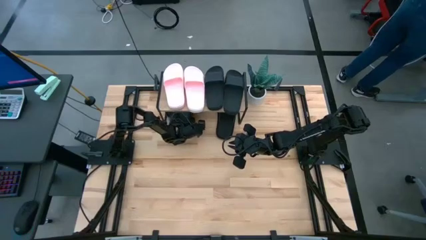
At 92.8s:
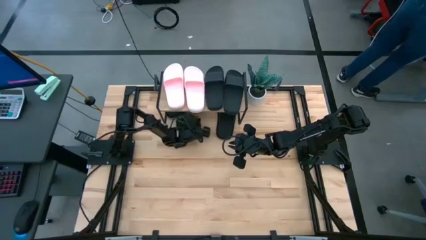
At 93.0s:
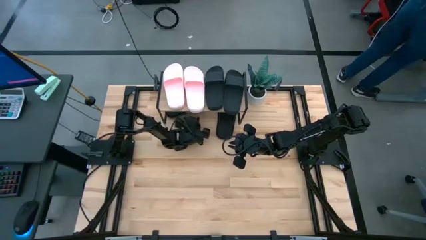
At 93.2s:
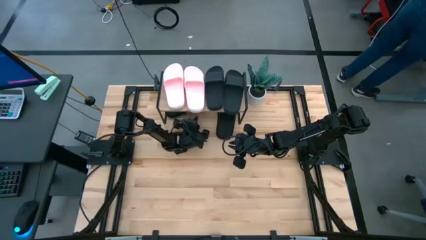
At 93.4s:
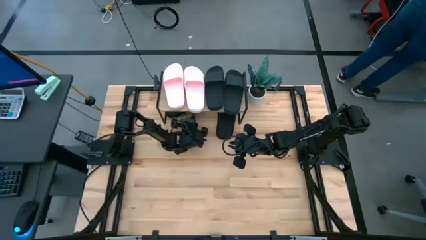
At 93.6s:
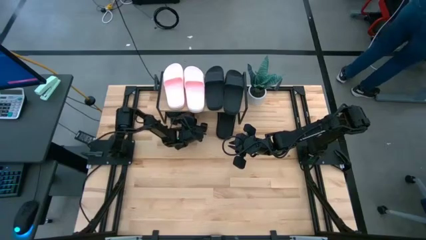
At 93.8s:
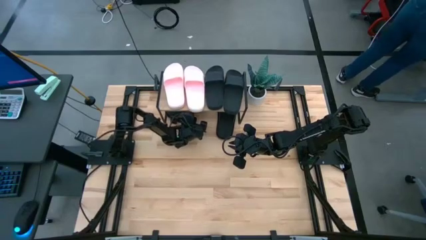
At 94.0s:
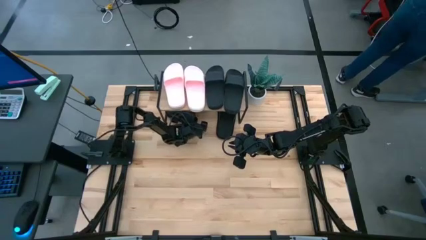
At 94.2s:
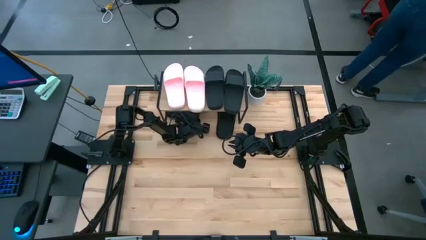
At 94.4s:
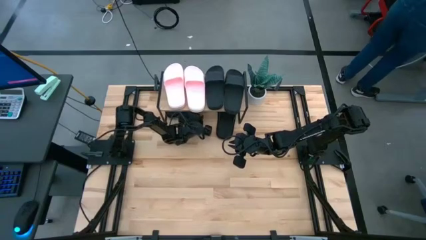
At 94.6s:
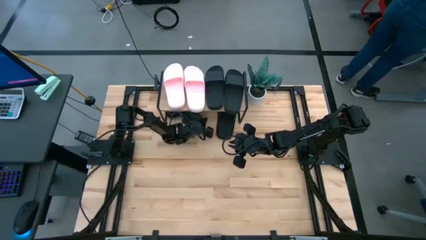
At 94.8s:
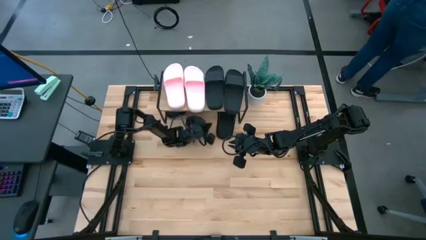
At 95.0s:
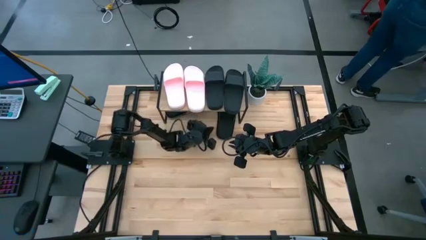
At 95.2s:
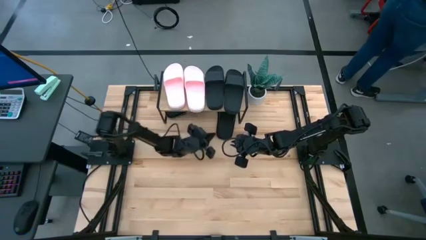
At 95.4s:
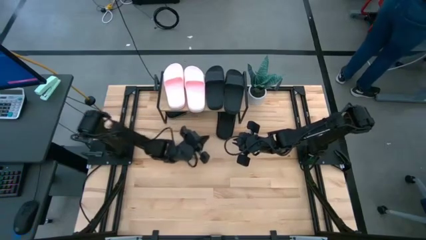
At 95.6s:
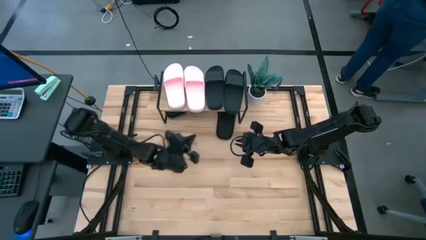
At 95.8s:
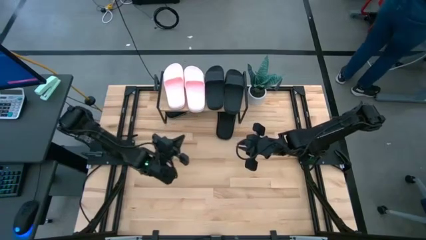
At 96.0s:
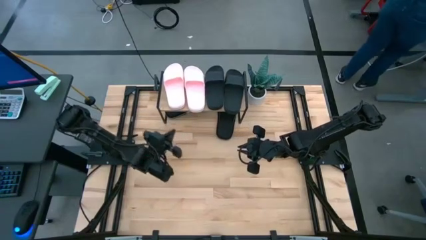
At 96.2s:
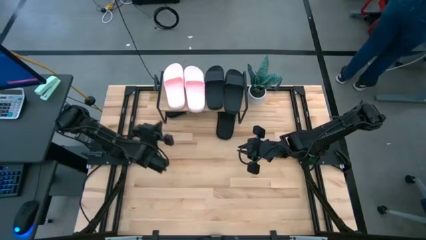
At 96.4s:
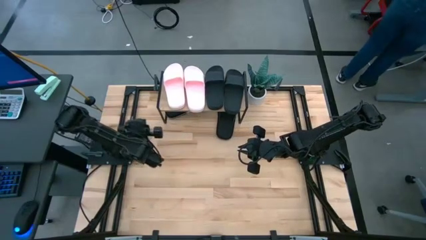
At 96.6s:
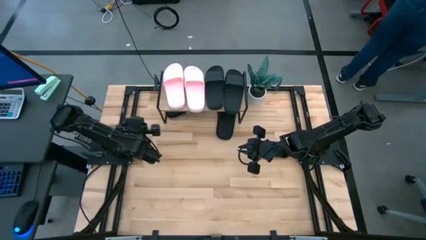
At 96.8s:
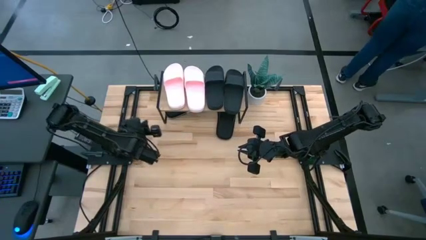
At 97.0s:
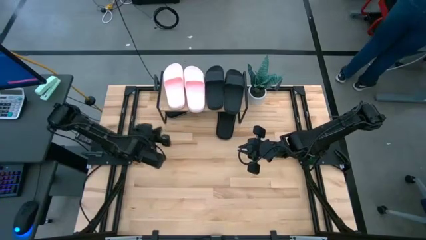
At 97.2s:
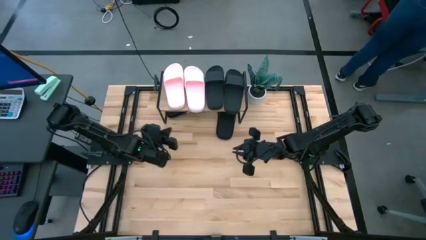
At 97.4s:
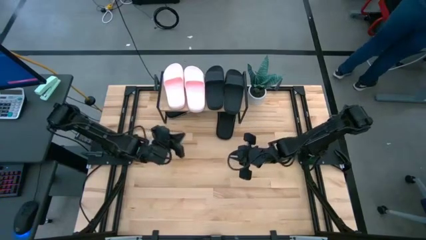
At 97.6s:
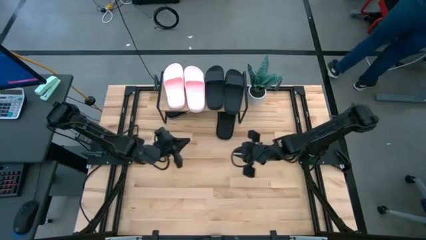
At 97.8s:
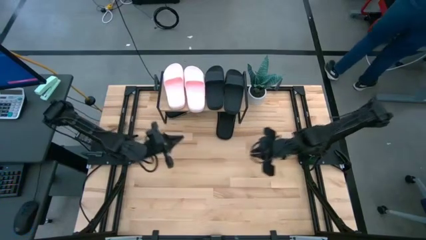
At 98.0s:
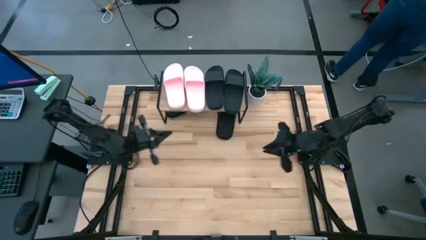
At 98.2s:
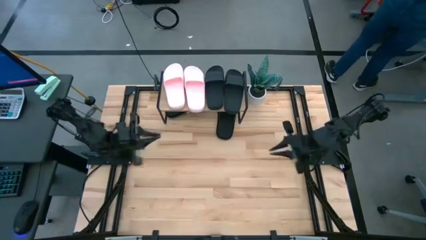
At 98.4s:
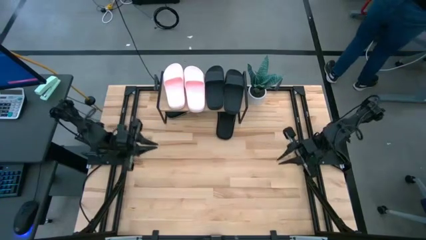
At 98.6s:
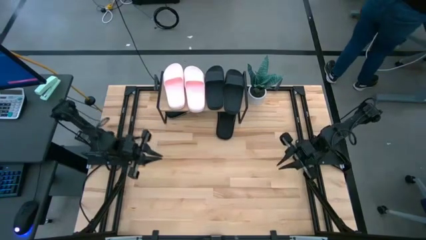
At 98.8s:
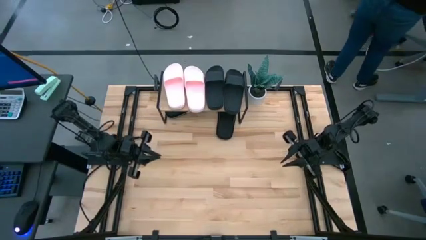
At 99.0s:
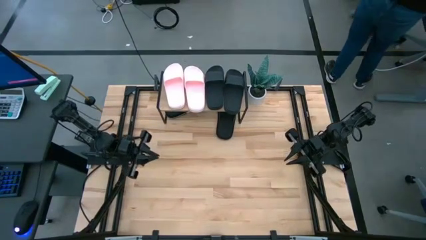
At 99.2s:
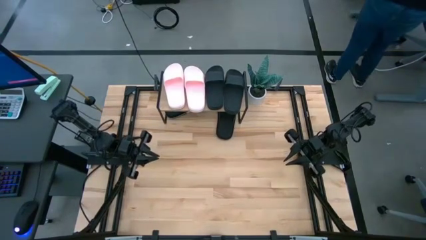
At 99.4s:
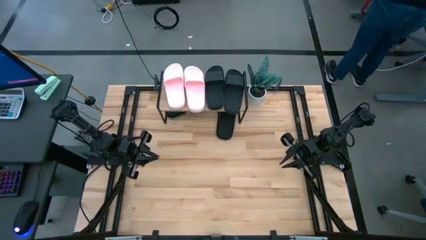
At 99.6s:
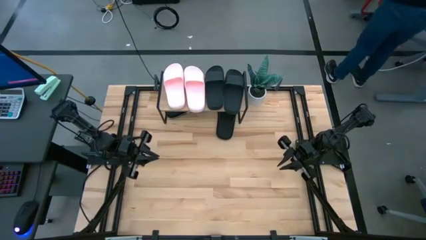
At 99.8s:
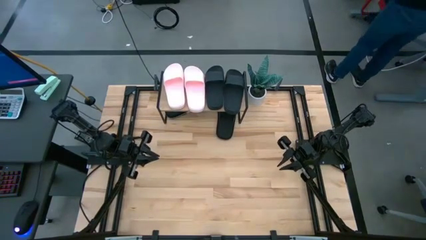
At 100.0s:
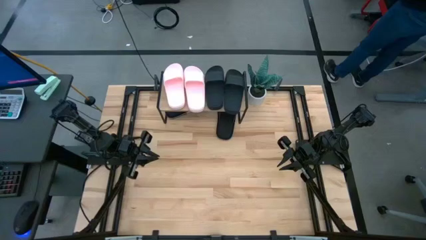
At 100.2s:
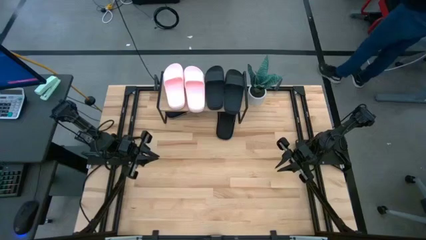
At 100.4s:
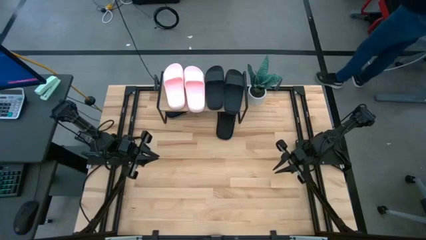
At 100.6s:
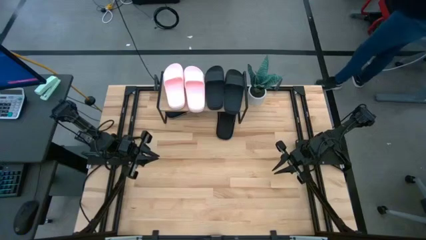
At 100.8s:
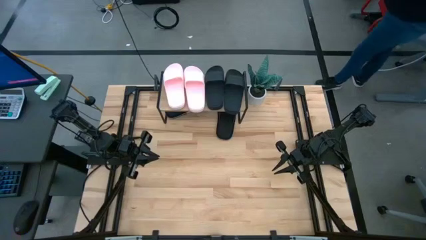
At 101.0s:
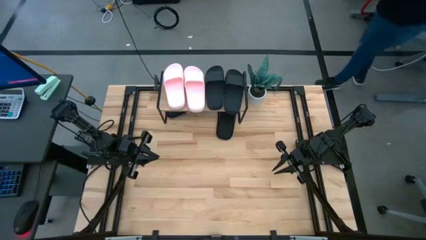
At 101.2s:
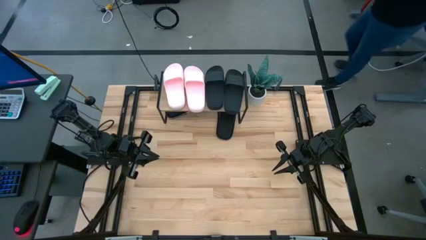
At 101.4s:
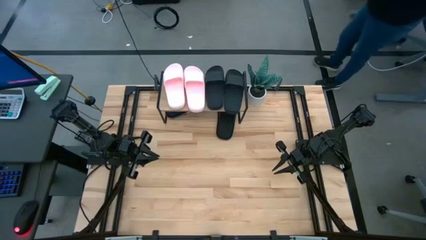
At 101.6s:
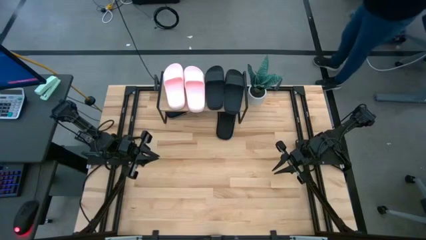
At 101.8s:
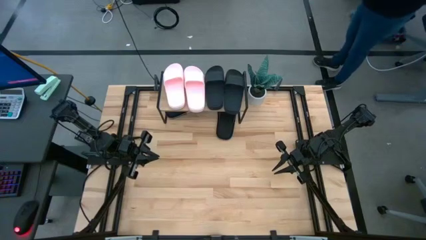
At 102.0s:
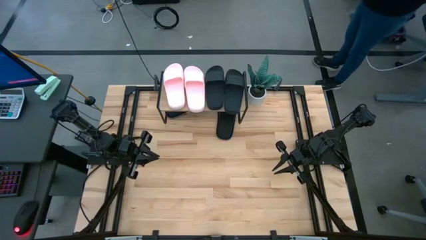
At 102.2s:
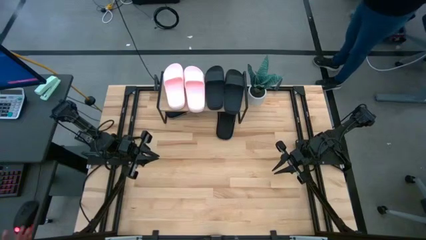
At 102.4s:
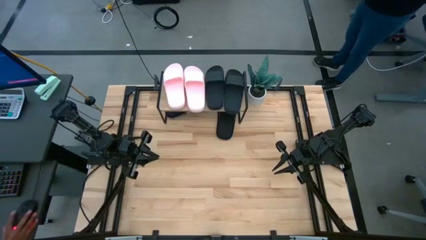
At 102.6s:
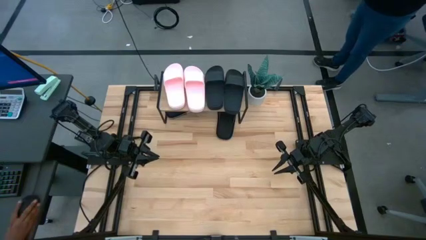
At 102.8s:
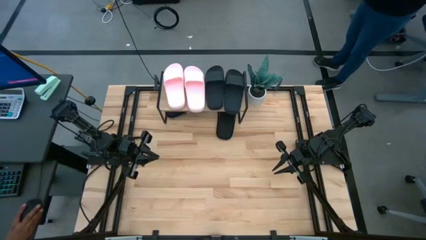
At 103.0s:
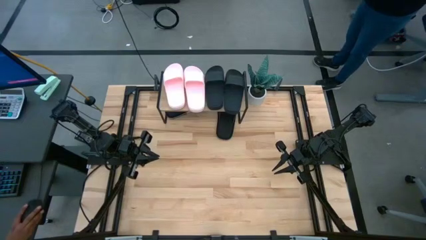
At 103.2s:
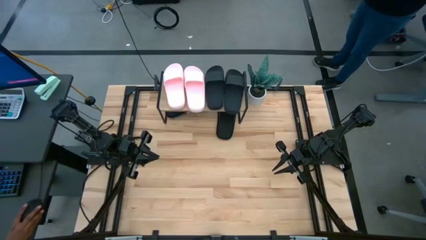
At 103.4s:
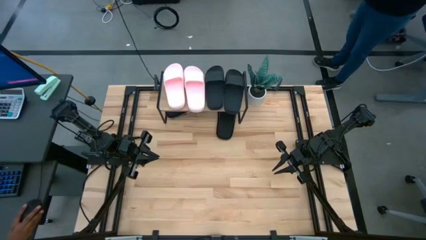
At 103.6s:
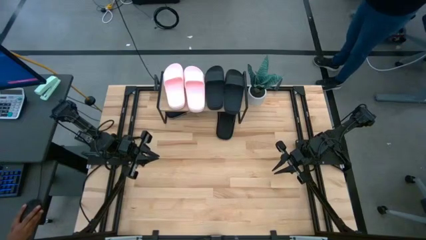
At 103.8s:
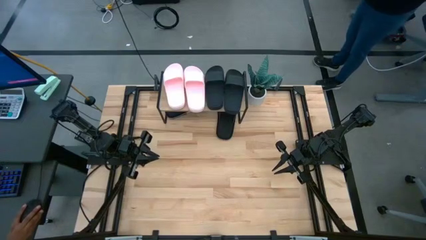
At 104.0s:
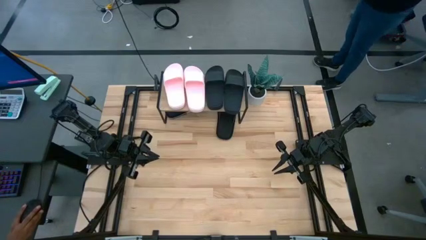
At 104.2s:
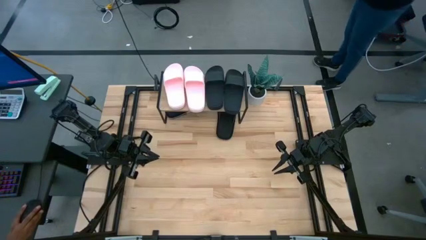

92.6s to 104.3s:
Task: Pick and place slides into the shelf
Return to Home Position

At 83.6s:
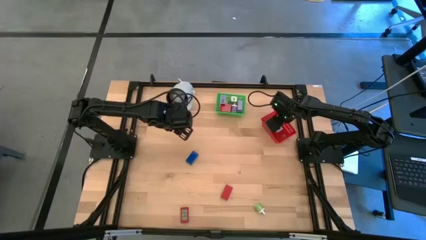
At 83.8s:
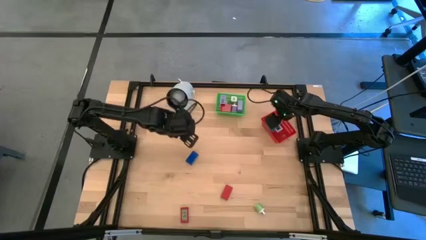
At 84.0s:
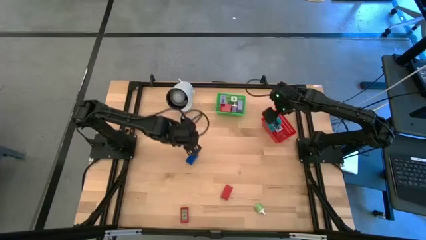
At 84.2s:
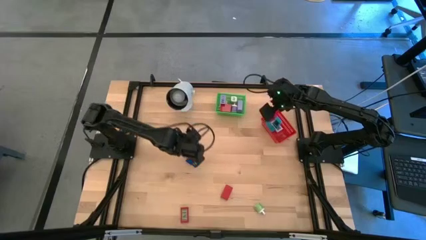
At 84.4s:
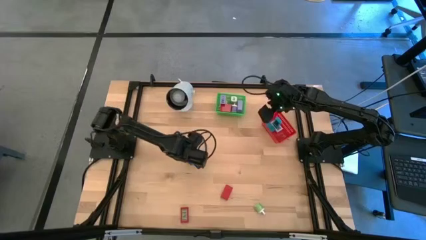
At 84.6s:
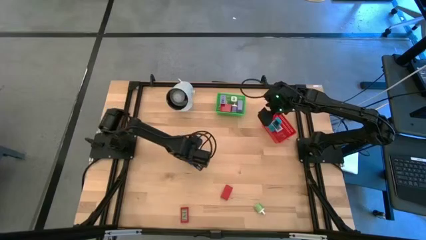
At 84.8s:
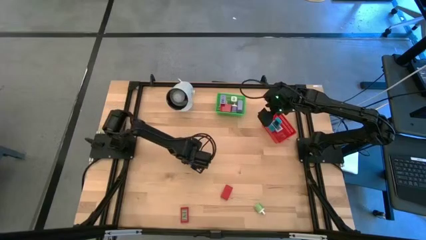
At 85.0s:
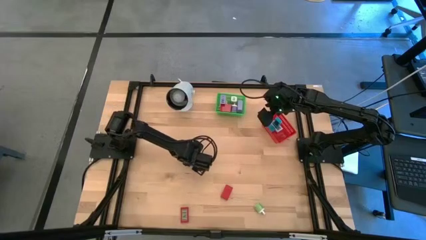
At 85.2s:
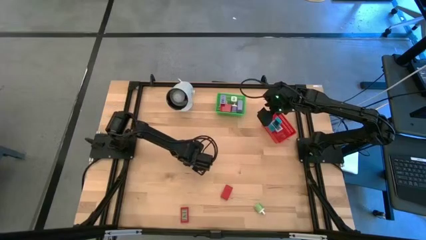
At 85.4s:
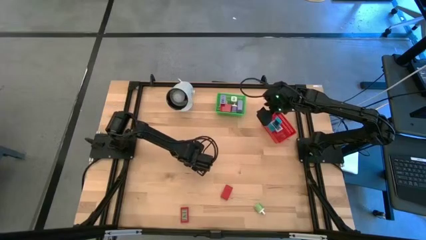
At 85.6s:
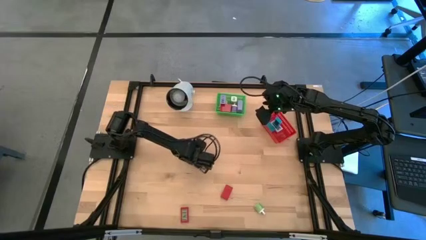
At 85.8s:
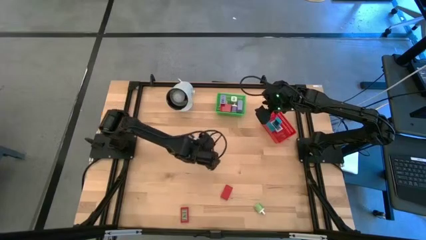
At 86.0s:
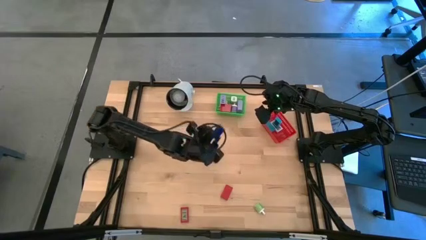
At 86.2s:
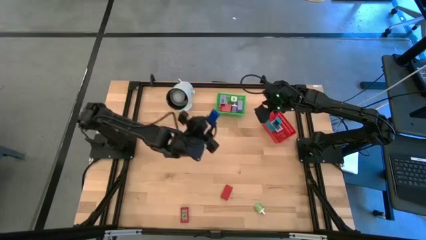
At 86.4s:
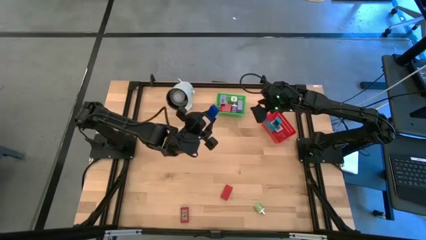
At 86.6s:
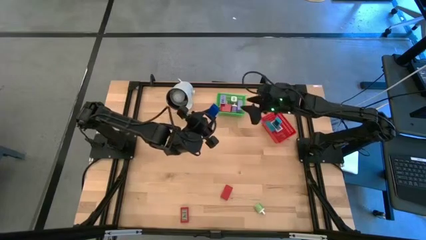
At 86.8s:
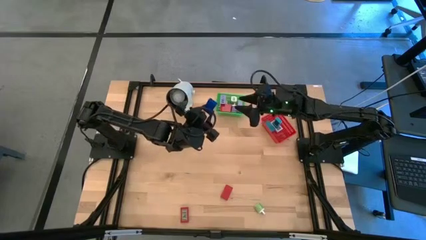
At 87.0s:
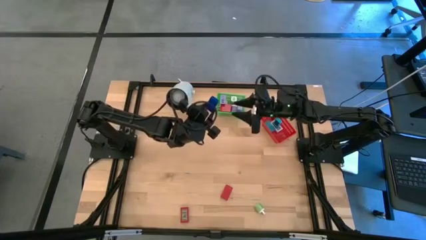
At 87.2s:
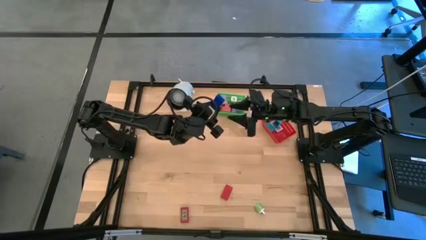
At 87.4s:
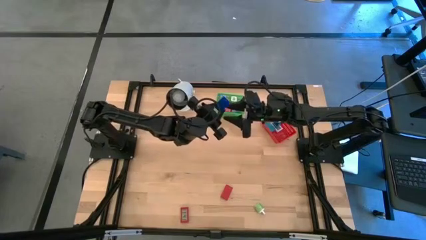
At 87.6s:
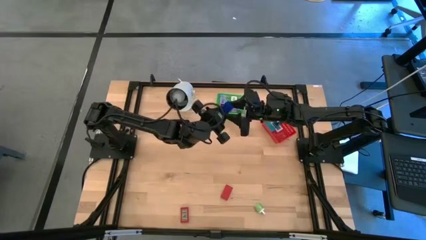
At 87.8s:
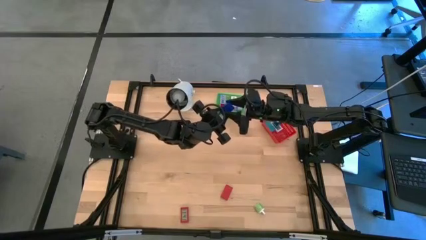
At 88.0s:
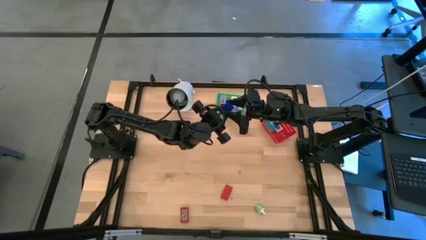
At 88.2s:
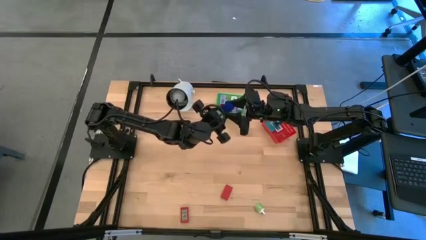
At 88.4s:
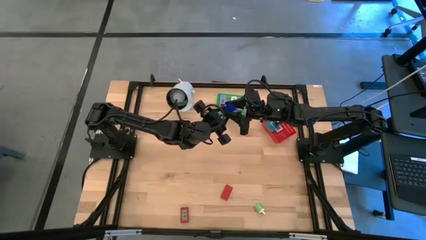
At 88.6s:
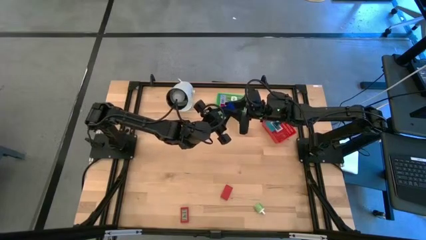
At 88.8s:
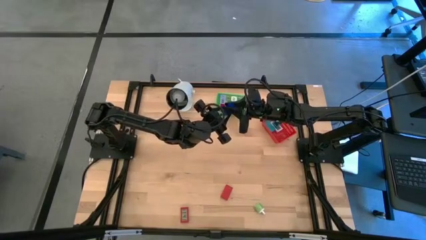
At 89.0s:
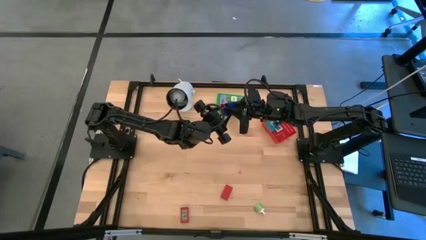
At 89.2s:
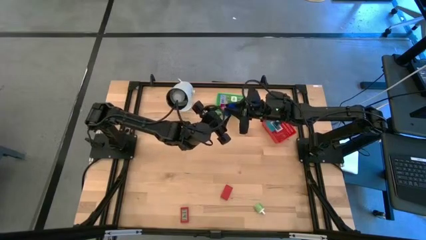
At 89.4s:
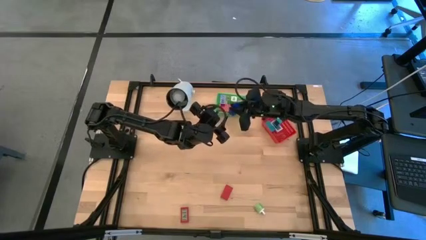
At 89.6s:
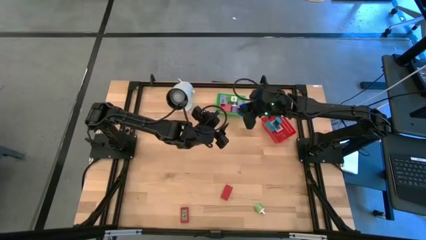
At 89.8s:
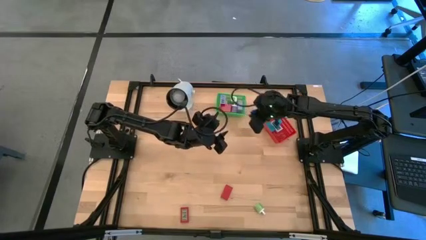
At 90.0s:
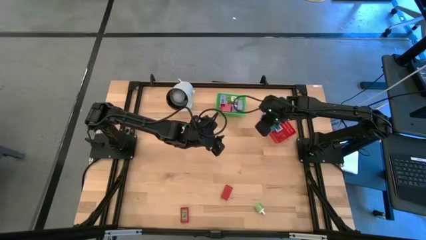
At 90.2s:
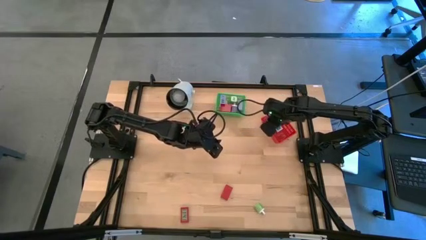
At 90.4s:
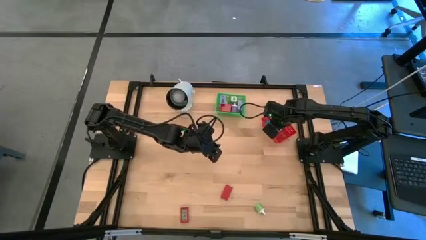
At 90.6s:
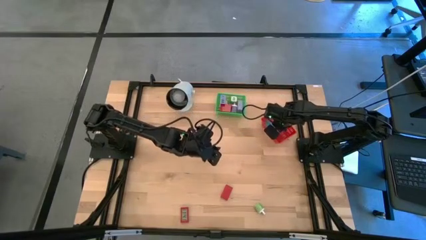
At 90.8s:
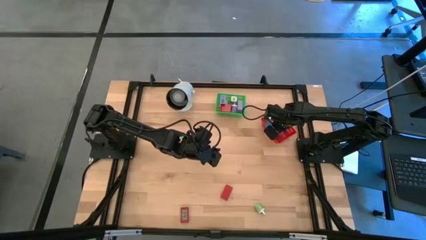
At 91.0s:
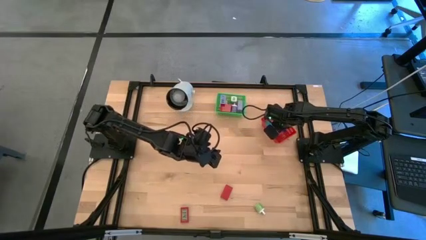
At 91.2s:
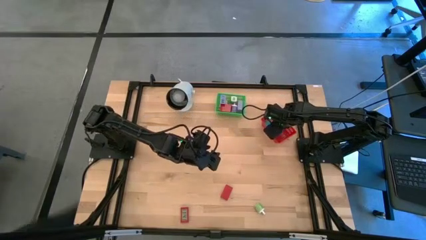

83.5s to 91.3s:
Task: Pick & Place Office items
Put the dark blue digital timer into the red bin
